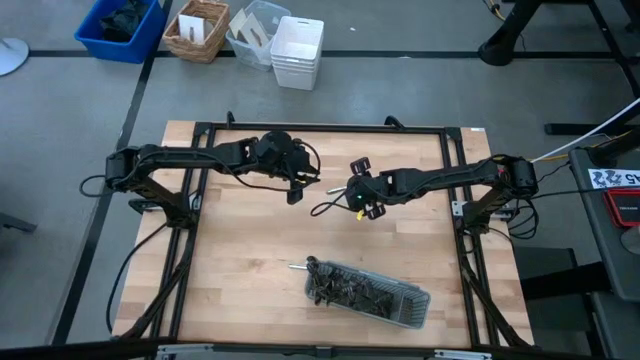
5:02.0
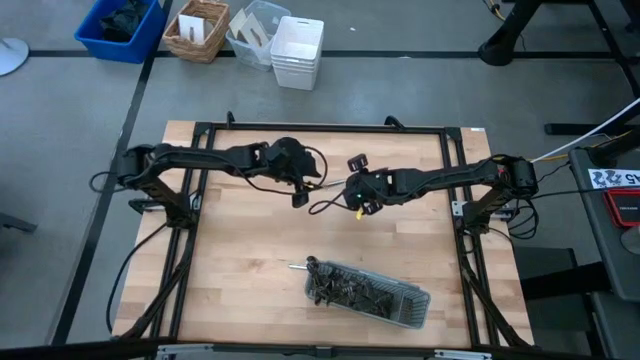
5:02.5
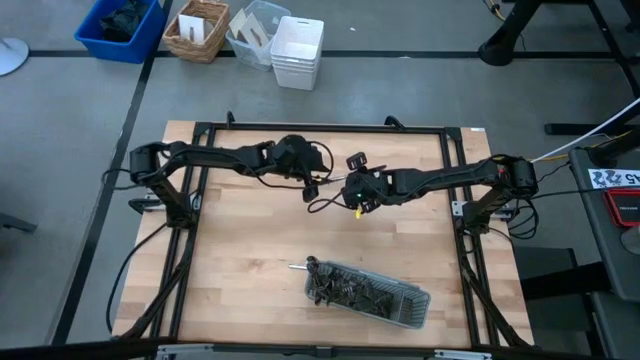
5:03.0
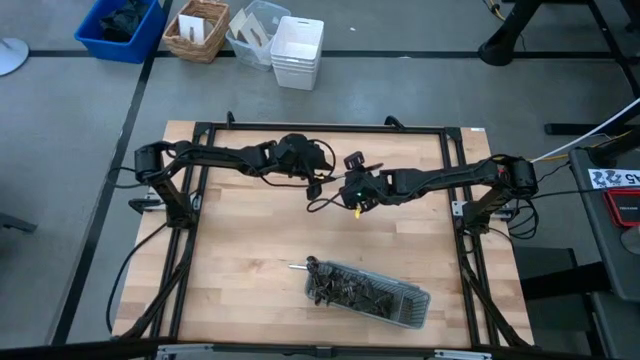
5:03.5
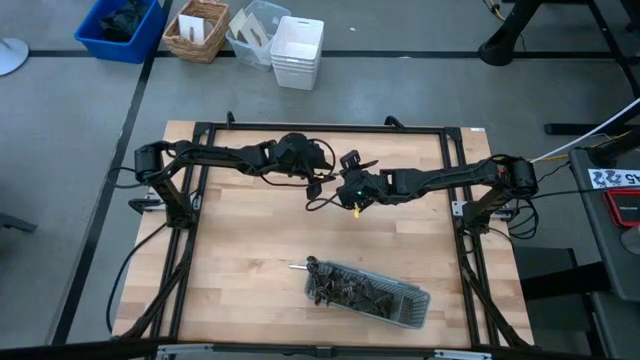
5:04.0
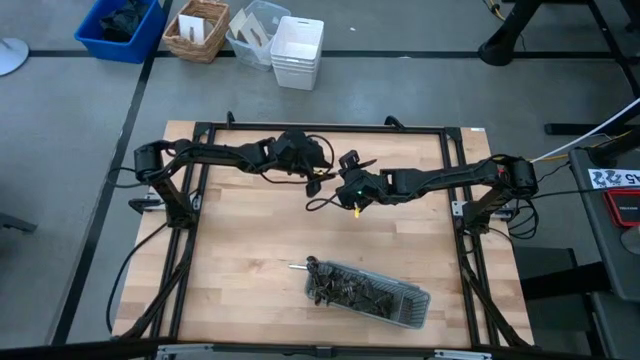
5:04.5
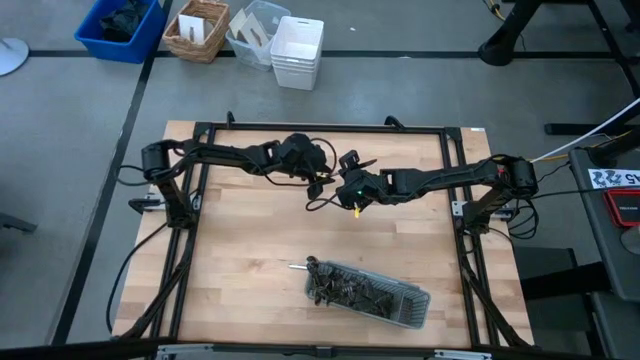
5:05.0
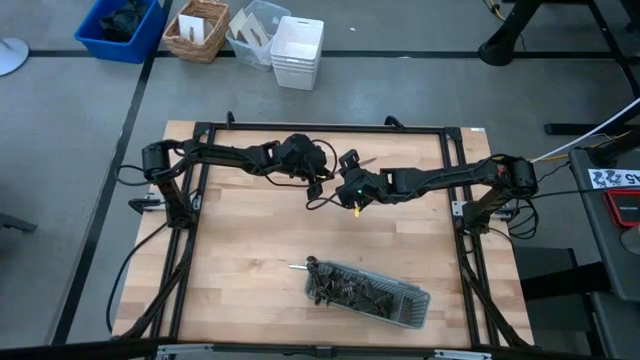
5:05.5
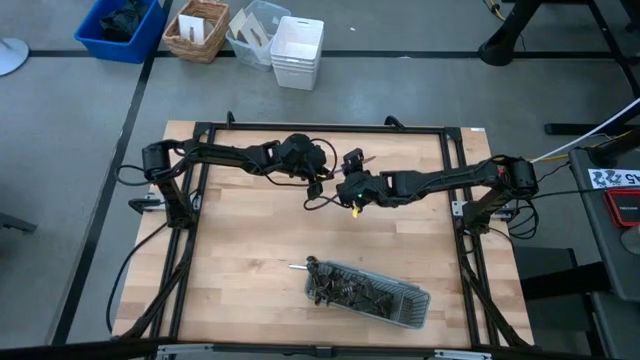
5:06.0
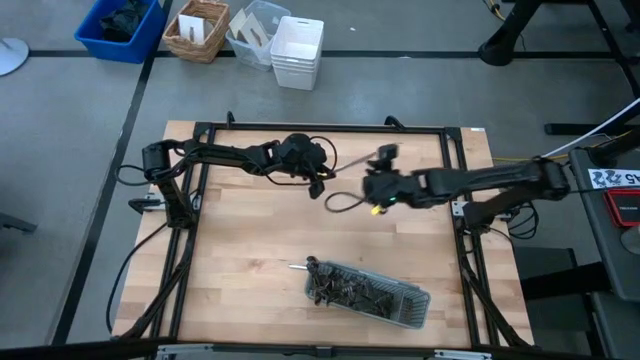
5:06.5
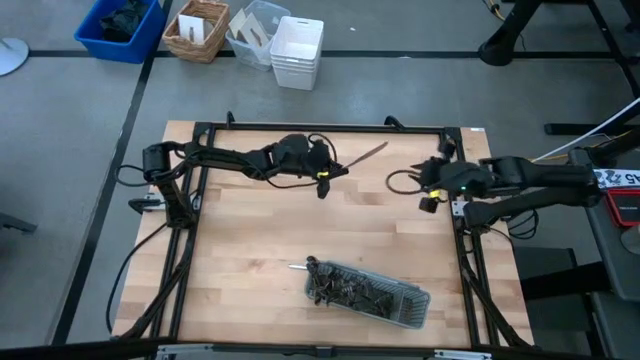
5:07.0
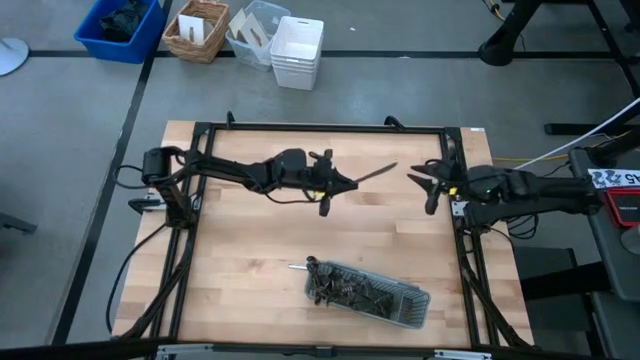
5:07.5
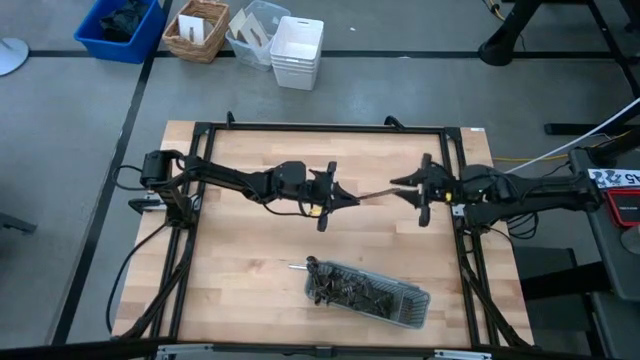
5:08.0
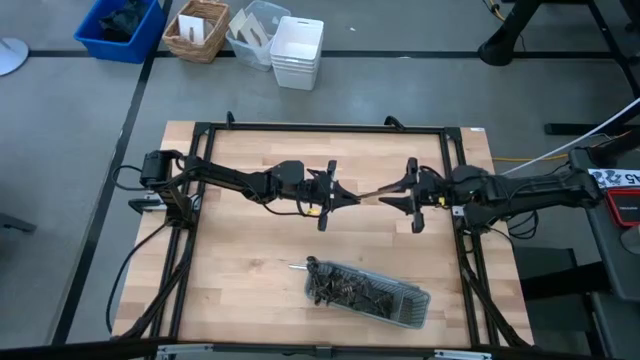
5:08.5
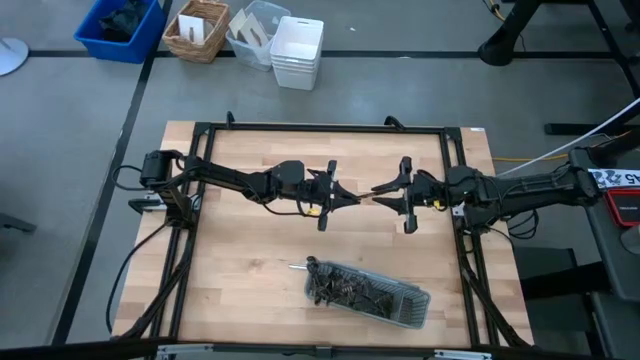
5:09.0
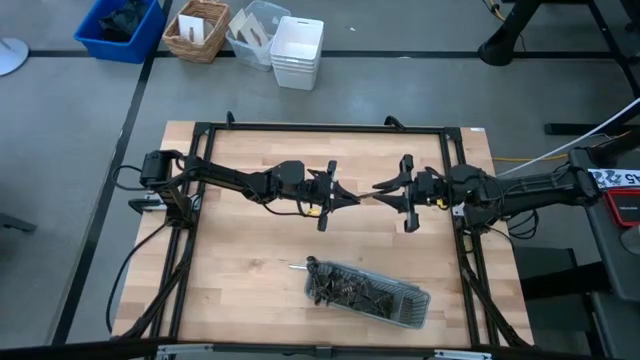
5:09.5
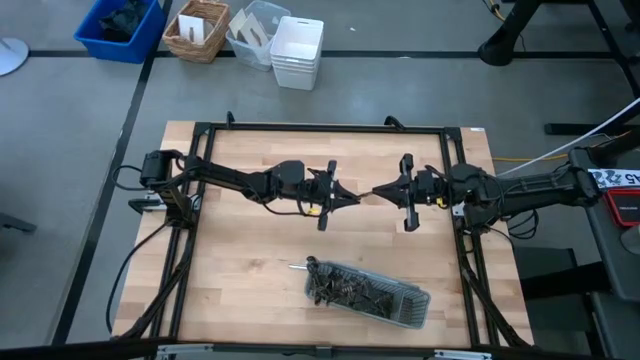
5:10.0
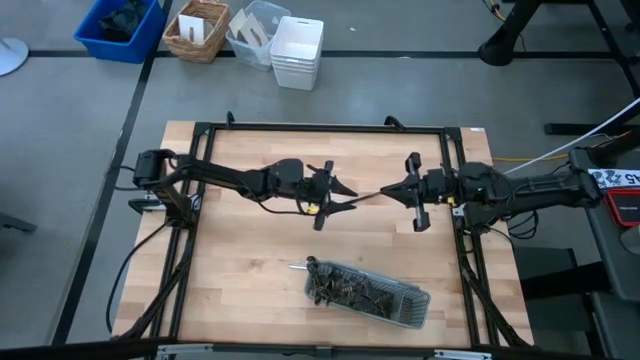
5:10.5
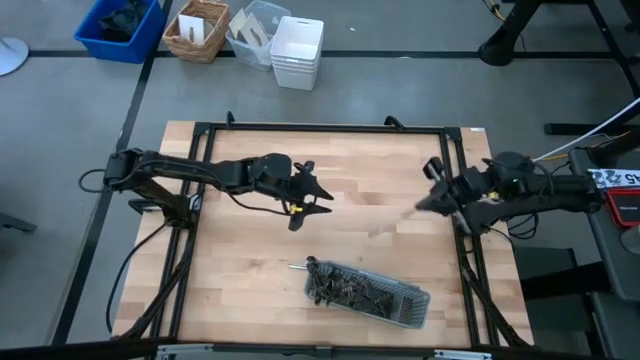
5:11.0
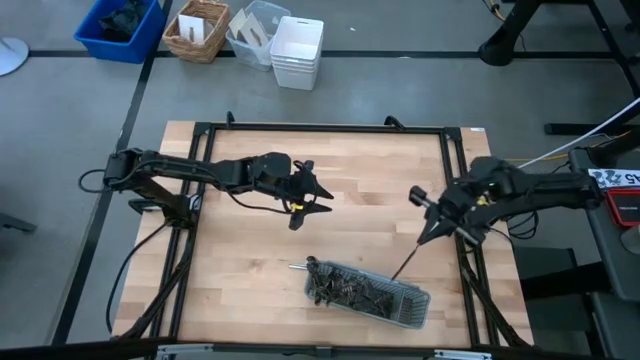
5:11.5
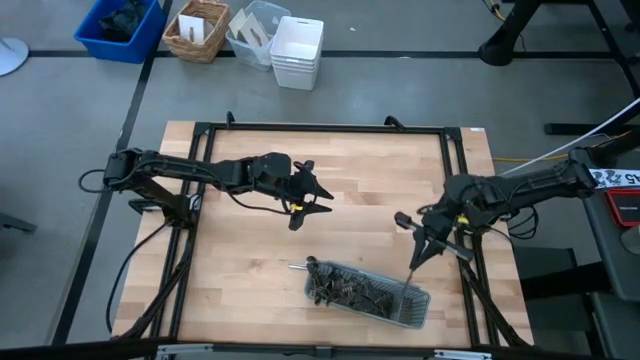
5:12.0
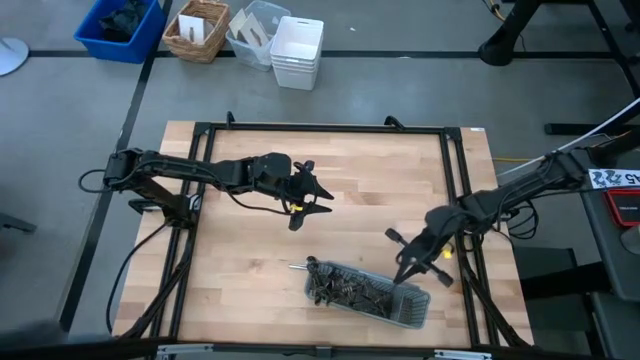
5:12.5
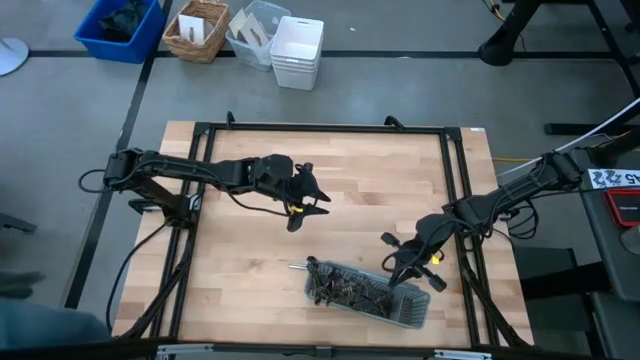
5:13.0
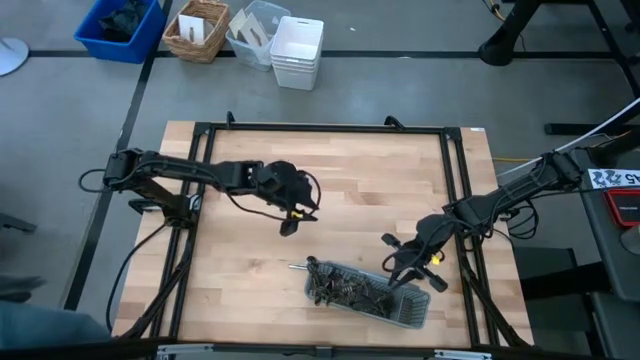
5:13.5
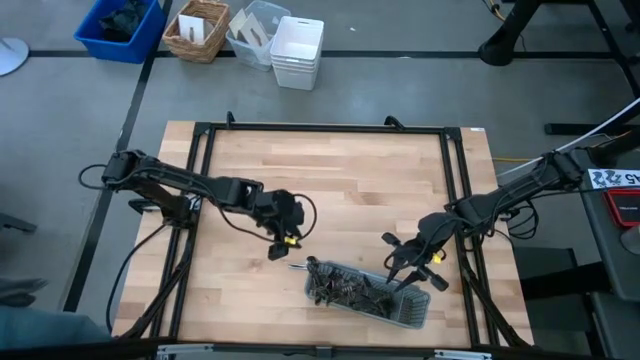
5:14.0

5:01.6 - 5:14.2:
Task: Sort silverware
Put the knife into the gray silverware rack

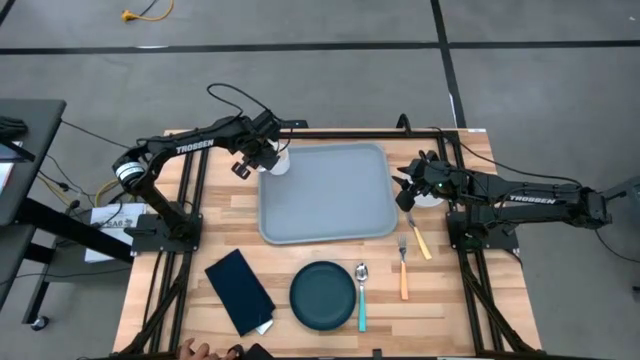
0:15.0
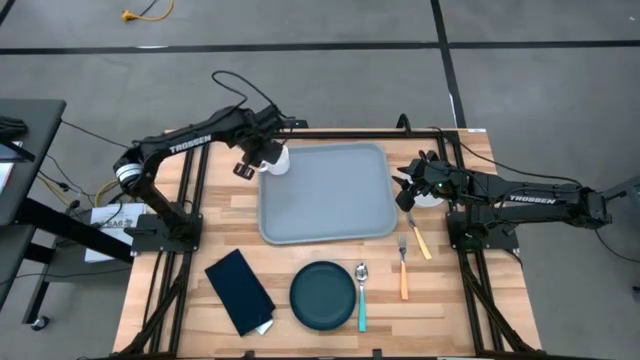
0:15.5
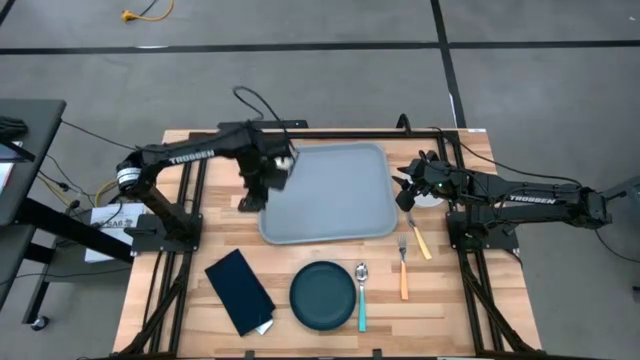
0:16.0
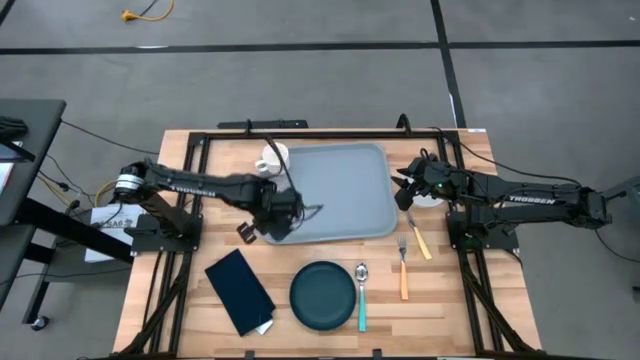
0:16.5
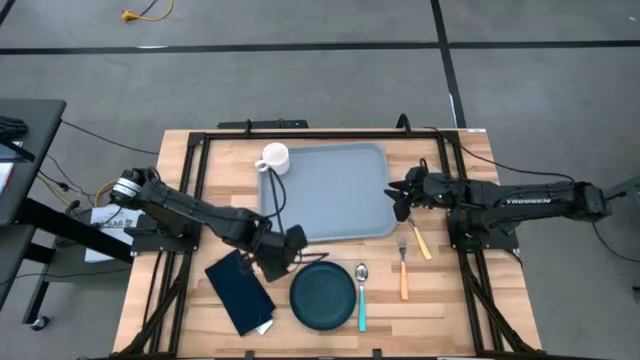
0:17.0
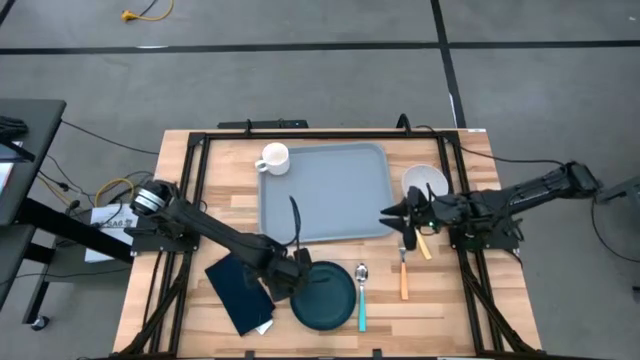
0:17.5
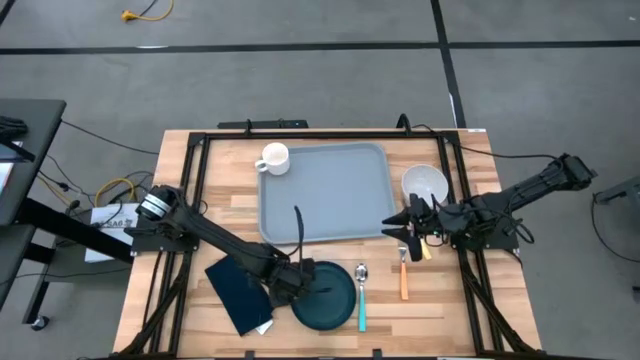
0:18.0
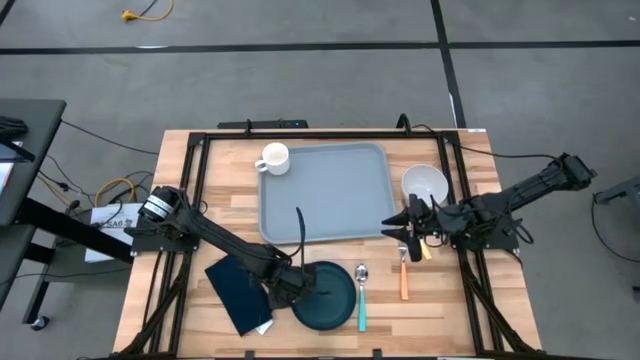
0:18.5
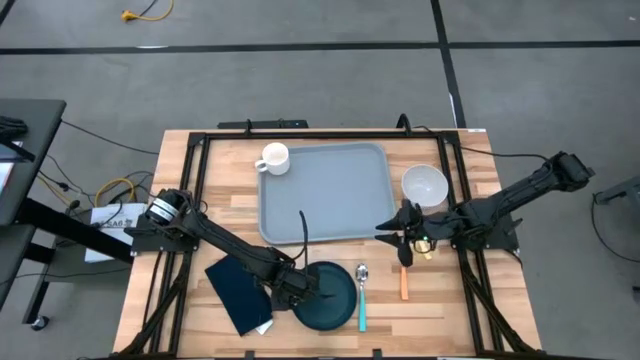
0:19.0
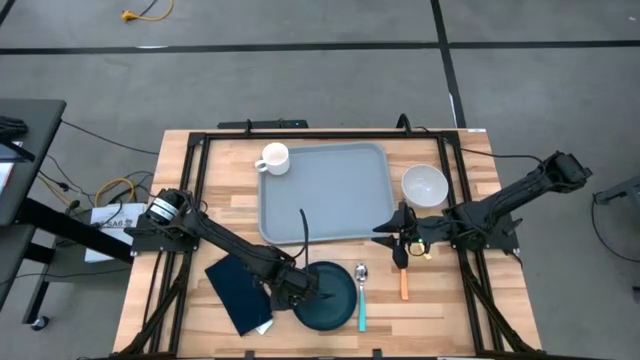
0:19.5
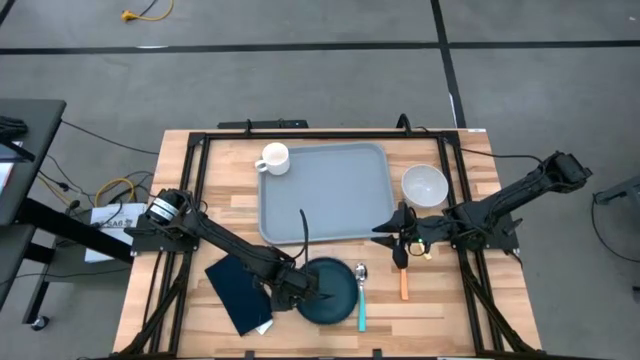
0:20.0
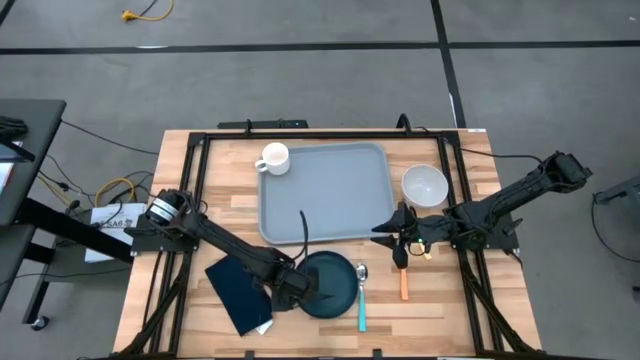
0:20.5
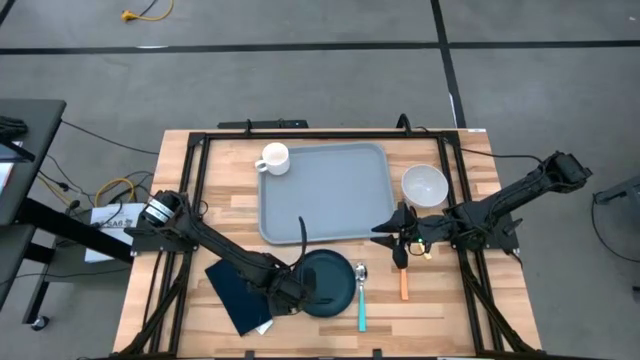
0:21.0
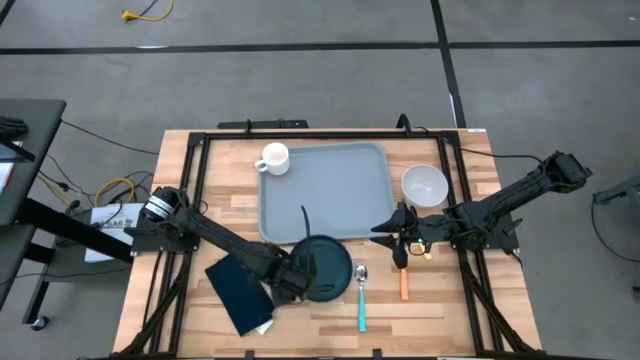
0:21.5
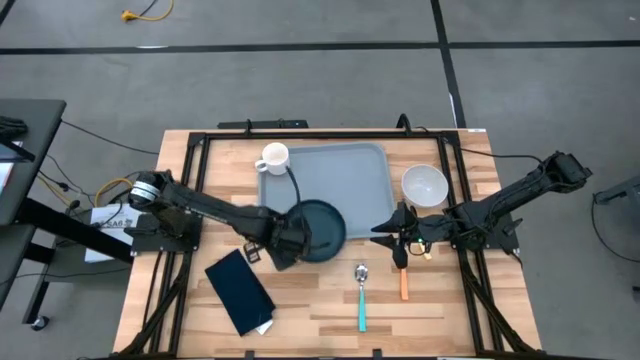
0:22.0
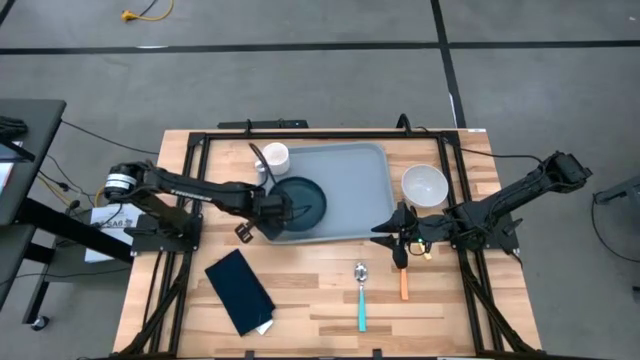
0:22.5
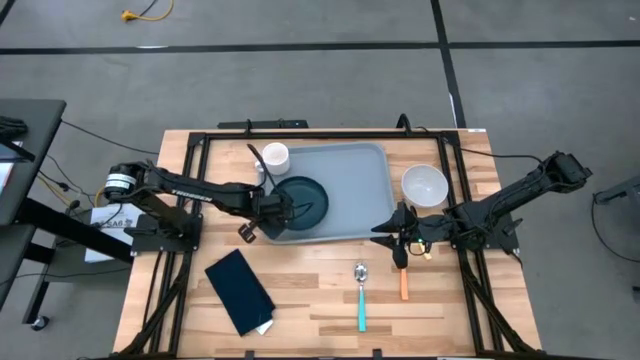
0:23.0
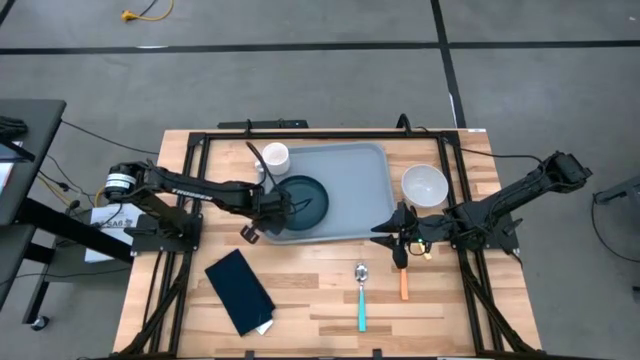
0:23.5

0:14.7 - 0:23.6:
Task: Set up tray
Put the green plate on the gray serving tray below the mug

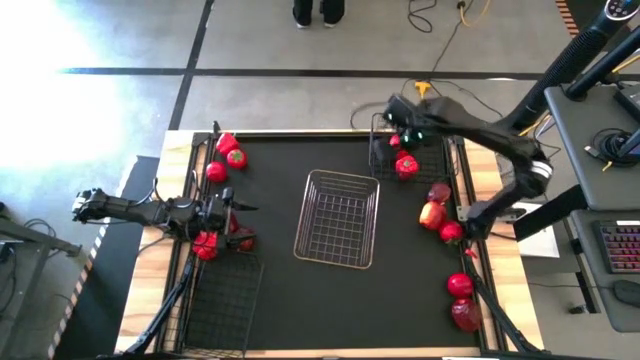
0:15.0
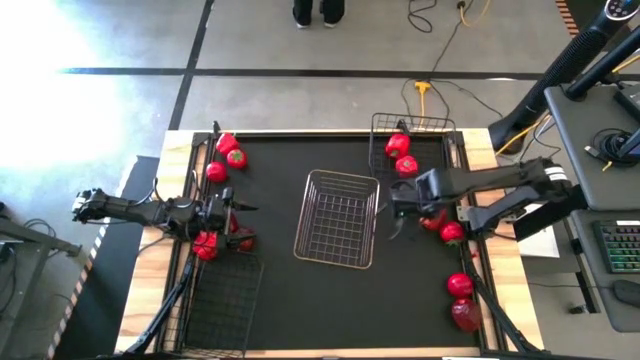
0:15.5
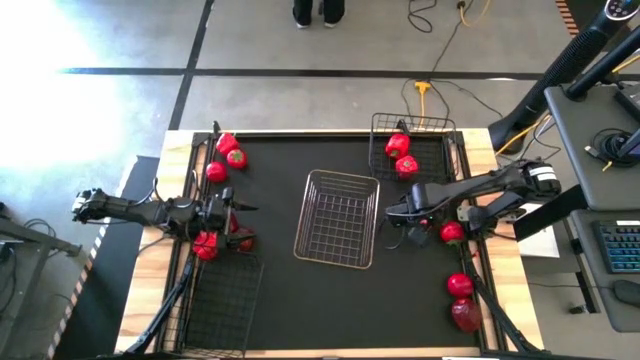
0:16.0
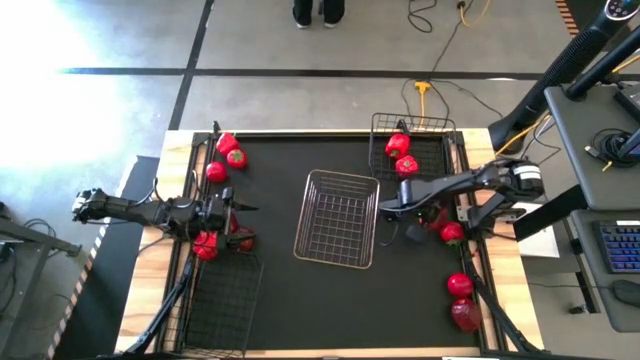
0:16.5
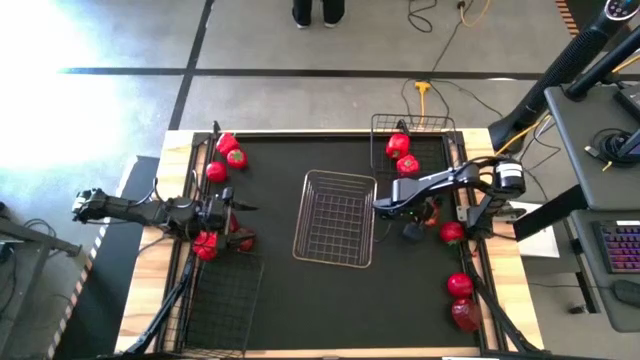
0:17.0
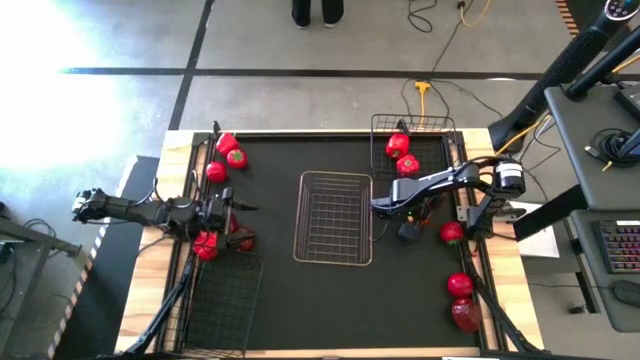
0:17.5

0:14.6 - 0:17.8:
Task: Sort produce into baskets
Put the red apple into the gold wire basket
